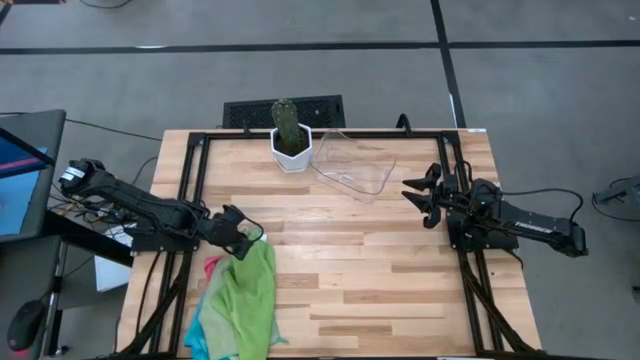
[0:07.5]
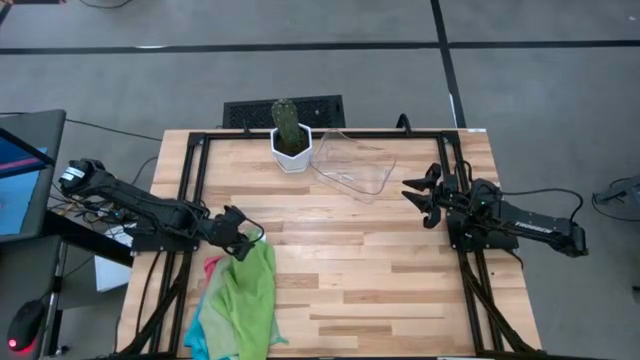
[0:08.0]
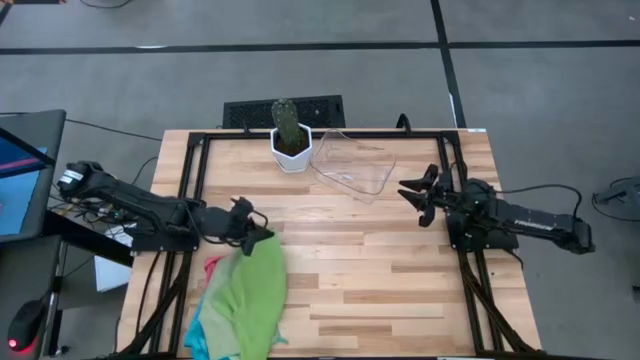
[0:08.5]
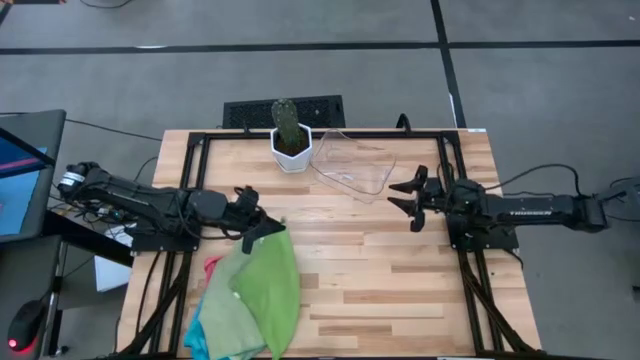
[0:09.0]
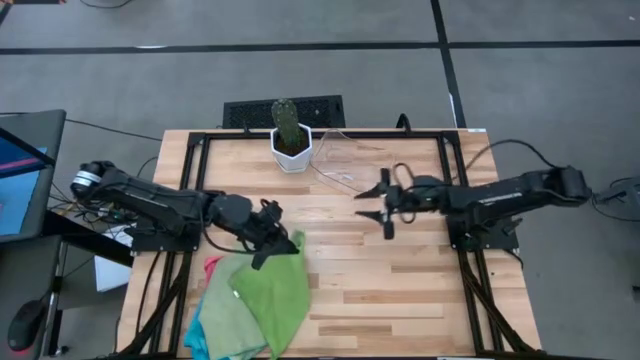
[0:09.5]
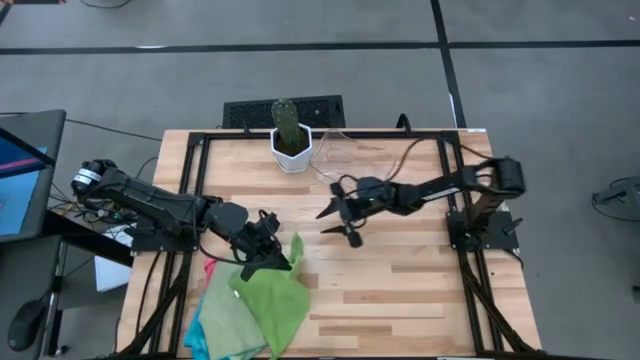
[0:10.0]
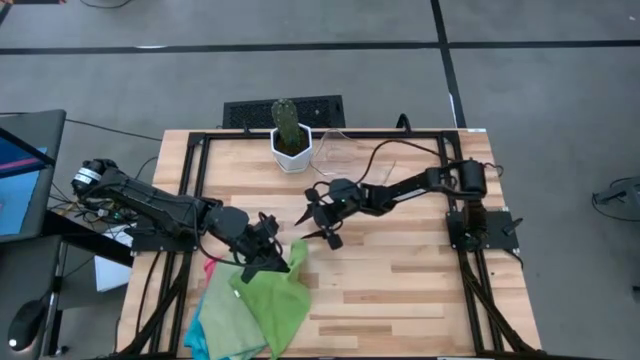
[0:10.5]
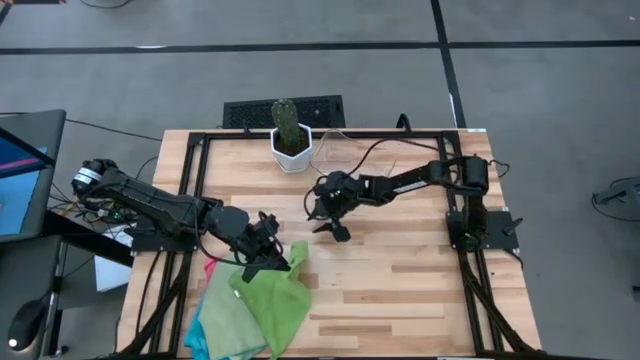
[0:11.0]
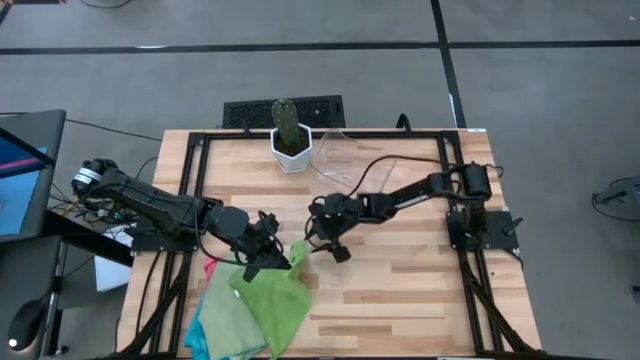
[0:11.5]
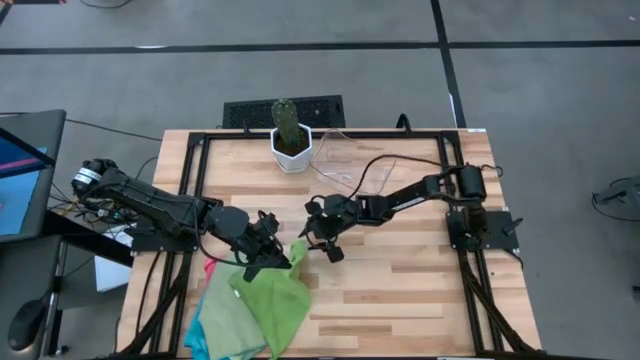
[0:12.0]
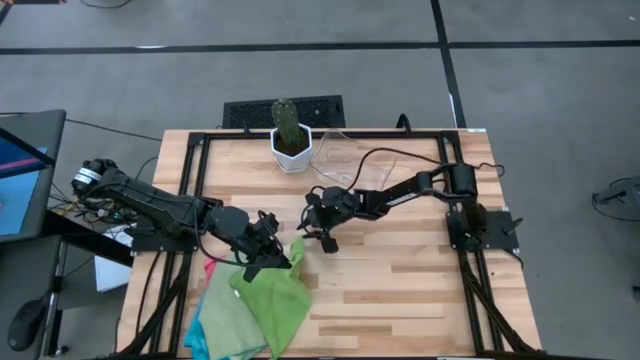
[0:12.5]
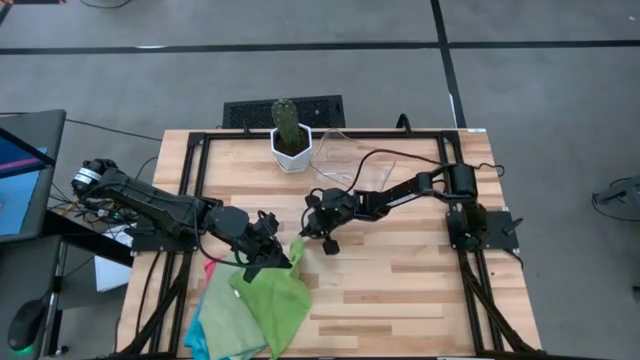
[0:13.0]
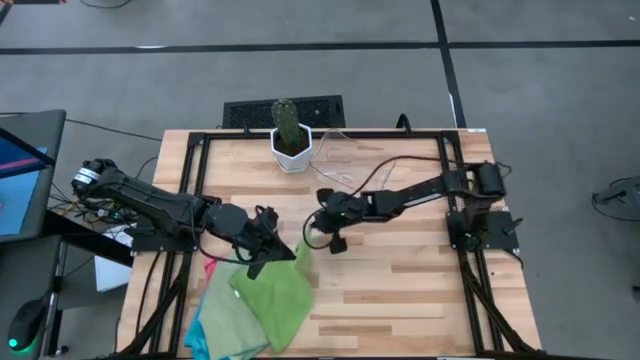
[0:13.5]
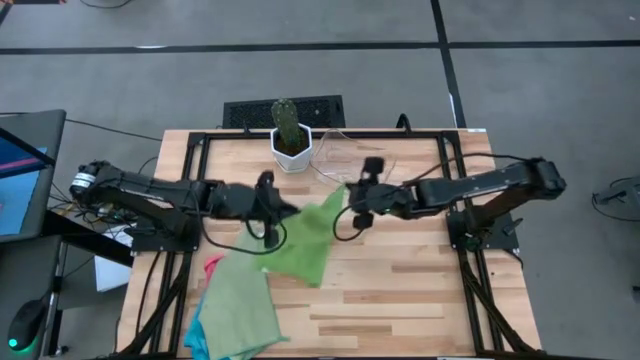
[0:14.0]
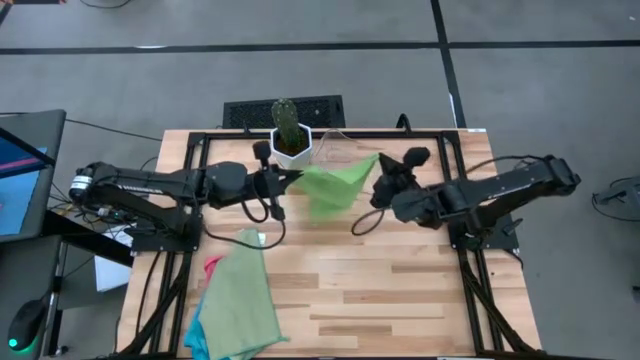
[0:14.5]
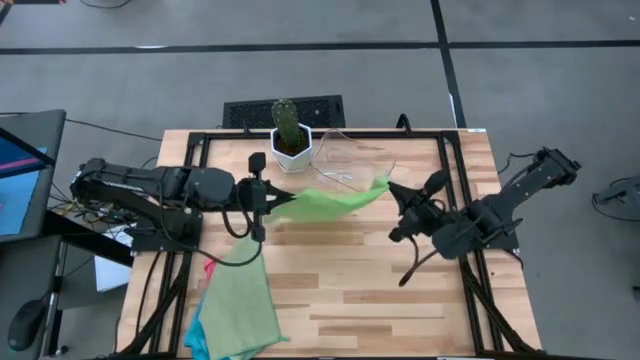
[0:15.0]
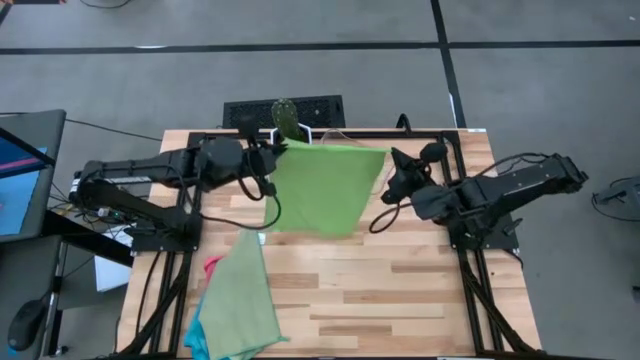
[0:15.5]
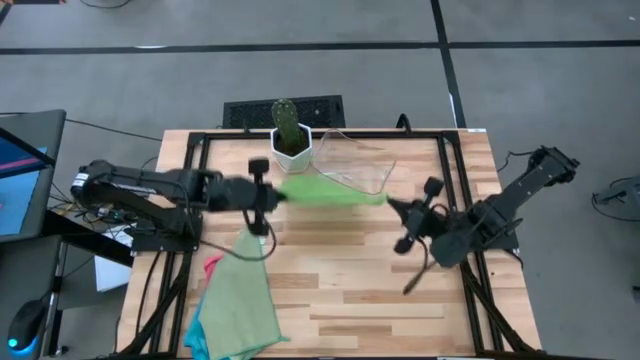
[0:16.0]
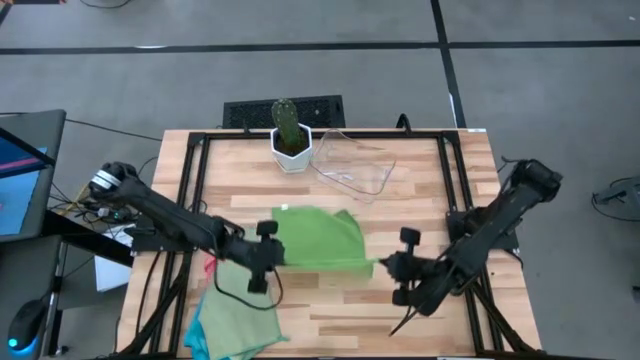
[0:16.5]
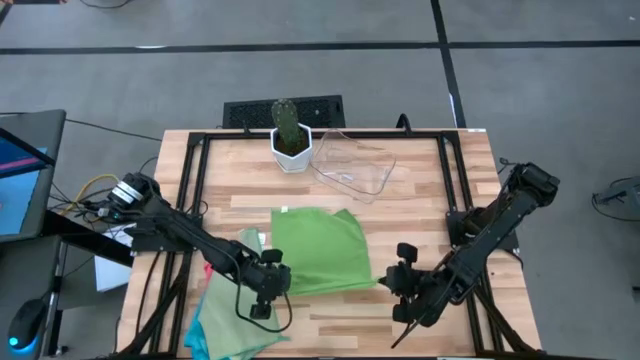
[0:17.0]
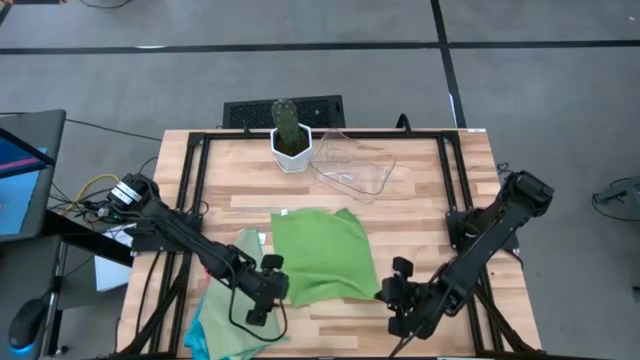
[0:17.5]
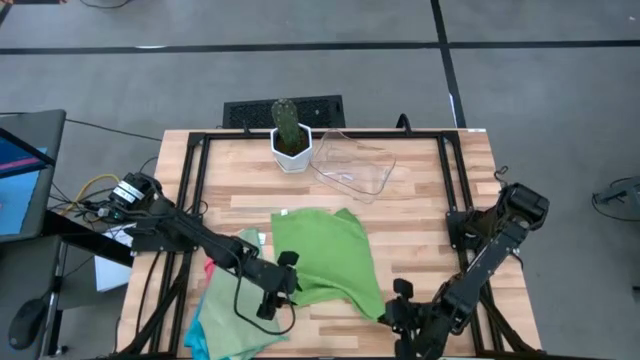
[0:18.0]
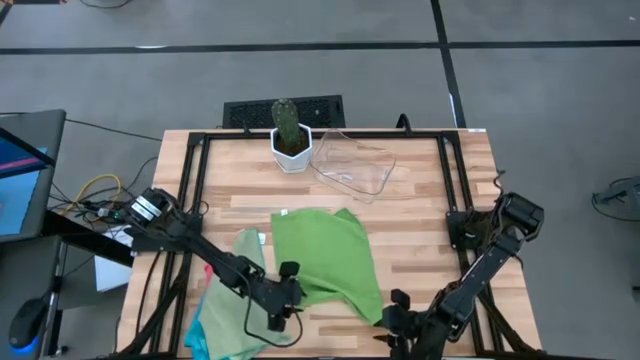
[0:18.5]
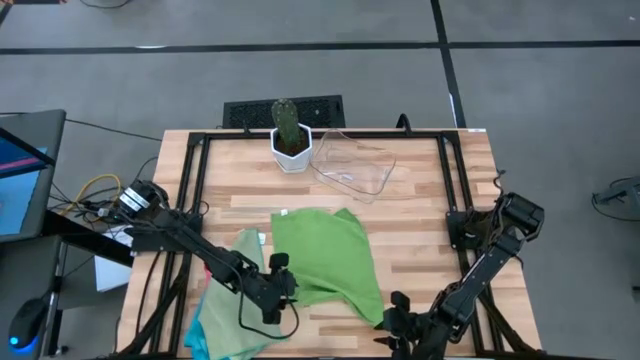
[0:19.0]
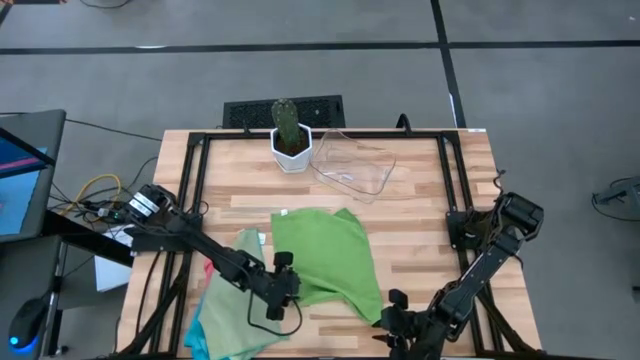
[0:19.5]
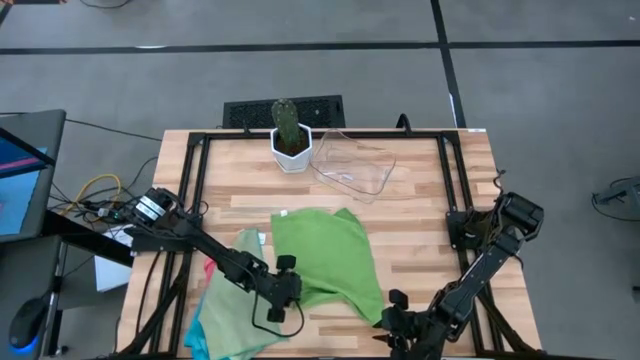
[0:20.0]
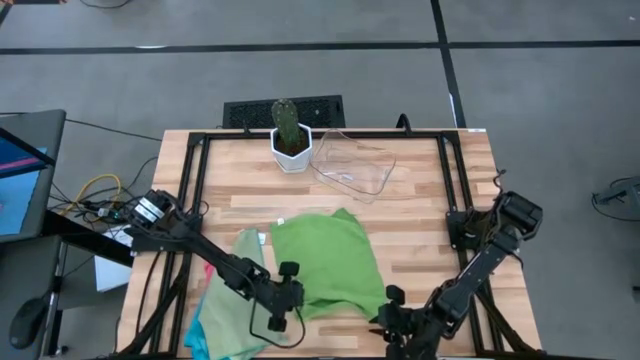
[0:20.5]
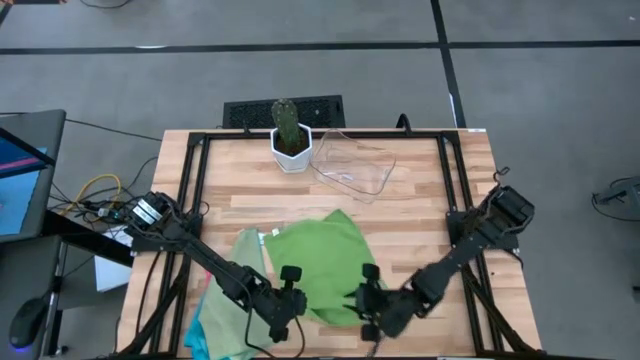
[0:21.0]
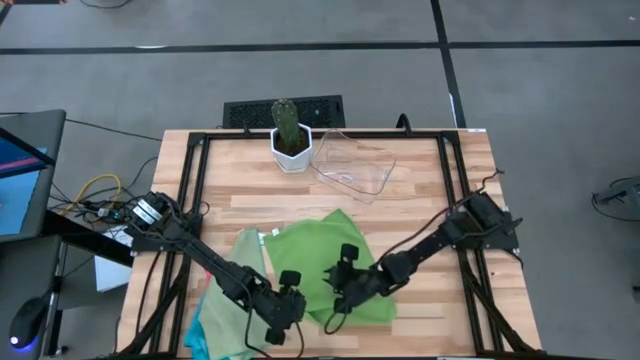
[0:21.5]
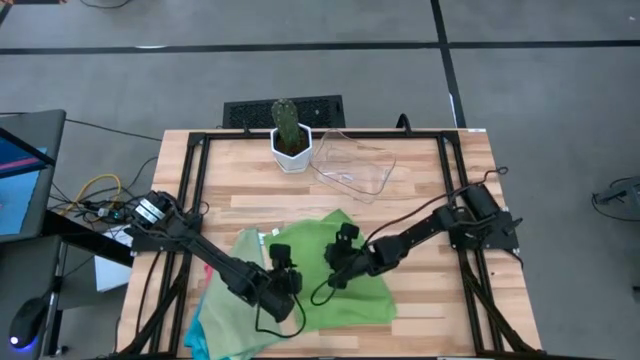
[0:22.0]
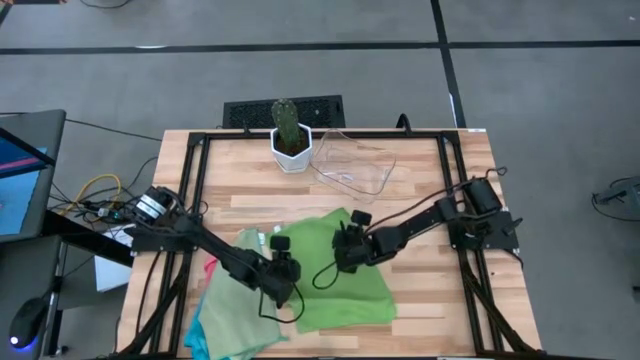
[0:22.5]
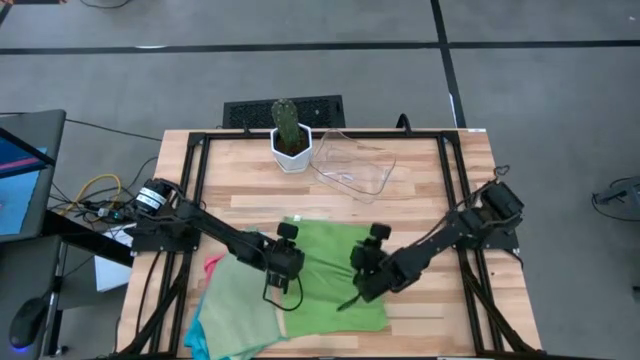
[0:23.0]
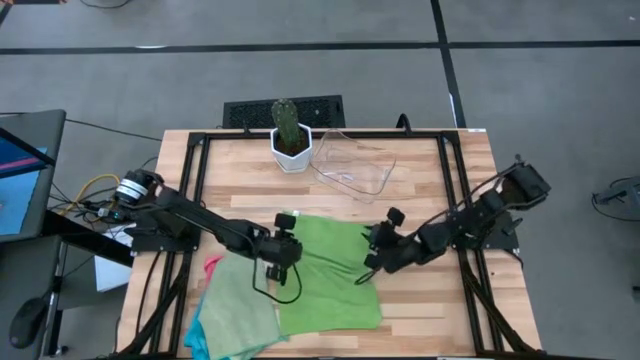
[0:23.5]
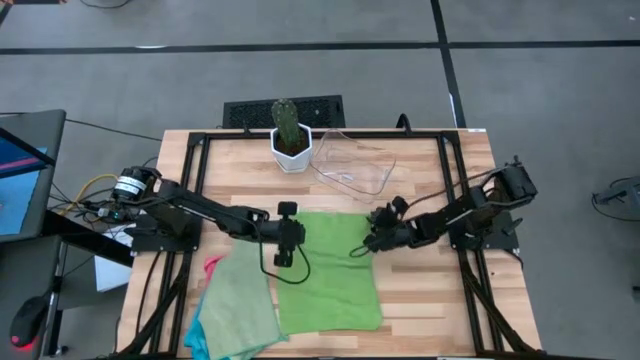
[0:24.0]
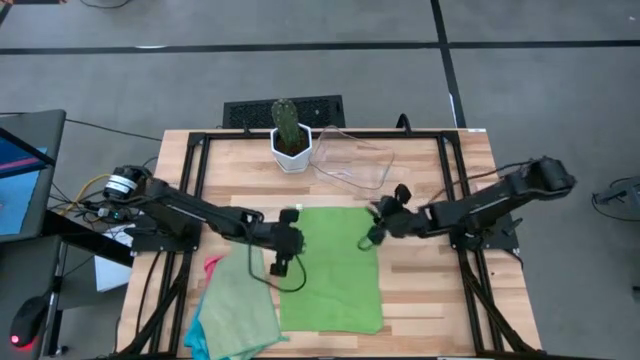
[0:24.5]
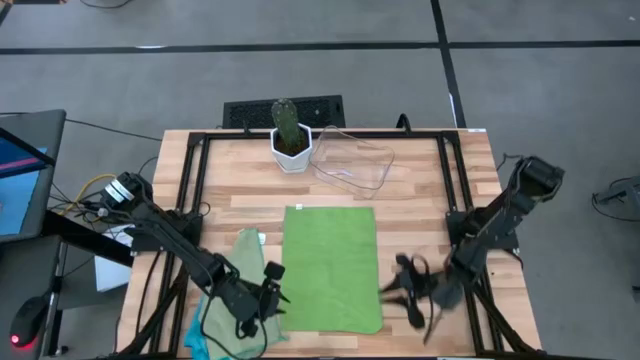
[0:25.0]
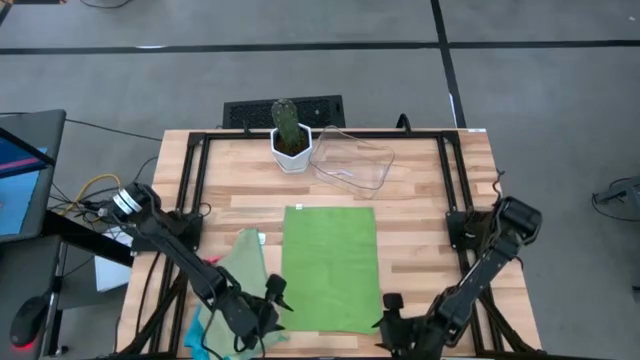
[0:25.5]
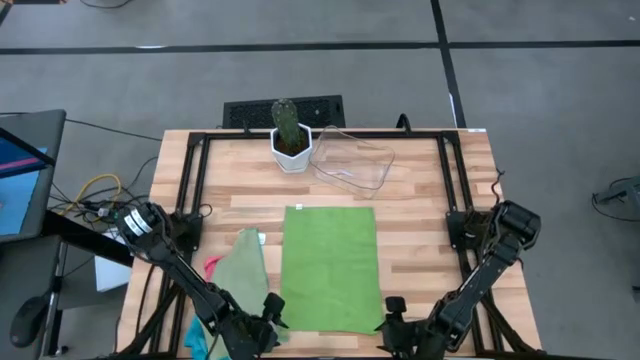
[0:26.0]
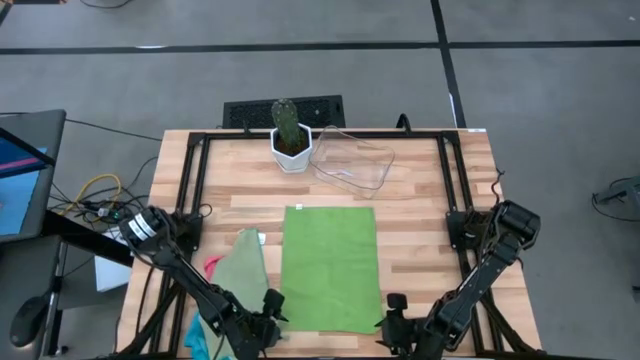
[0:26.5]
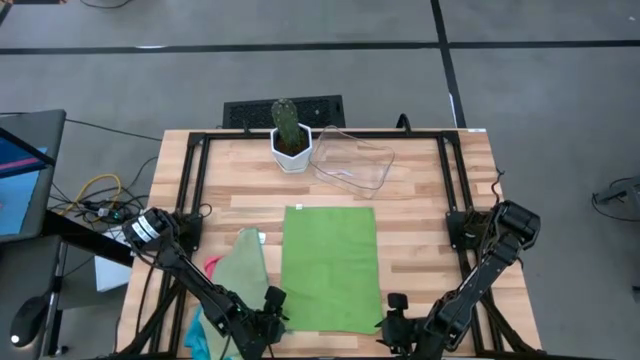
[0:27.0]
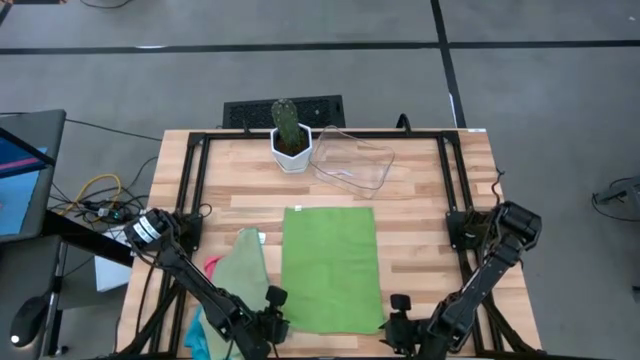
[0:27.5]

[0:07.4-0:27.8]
Task: Fold microfiber towels
Fold the green towel
